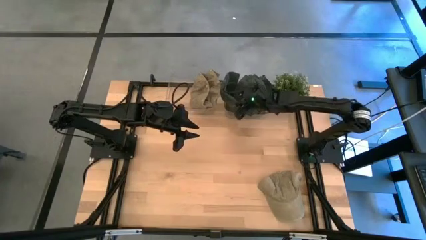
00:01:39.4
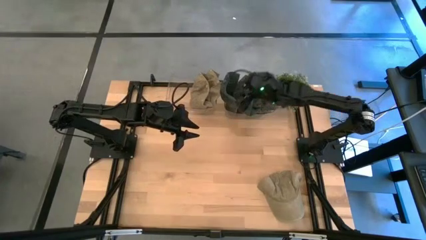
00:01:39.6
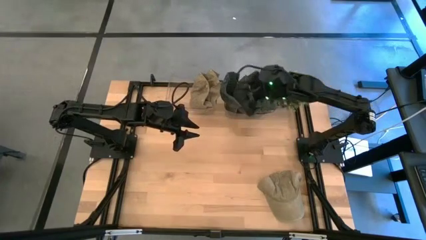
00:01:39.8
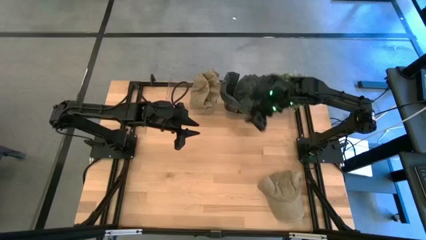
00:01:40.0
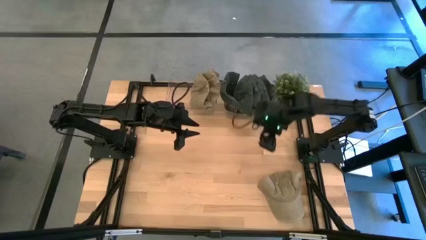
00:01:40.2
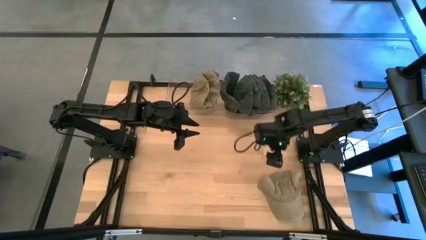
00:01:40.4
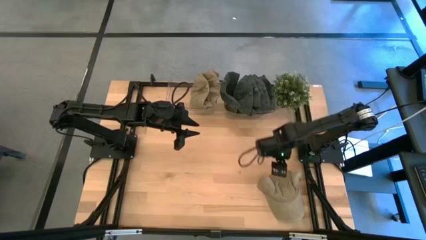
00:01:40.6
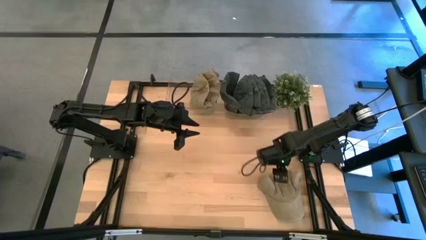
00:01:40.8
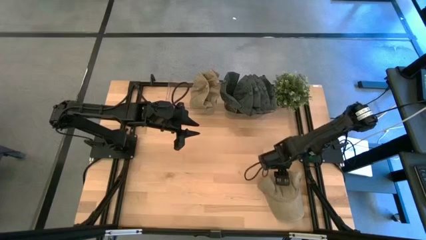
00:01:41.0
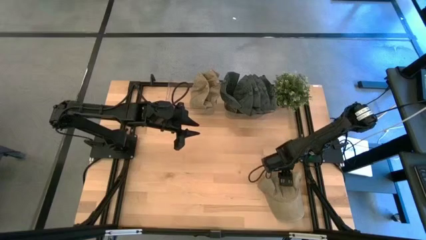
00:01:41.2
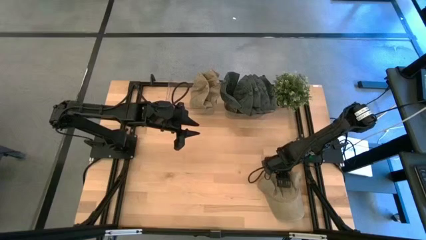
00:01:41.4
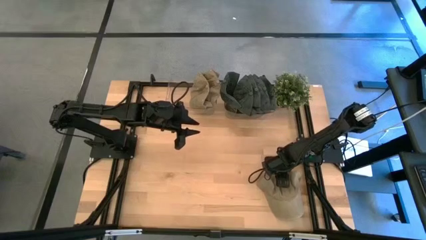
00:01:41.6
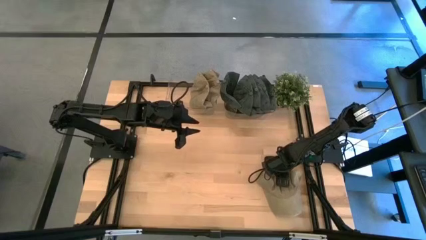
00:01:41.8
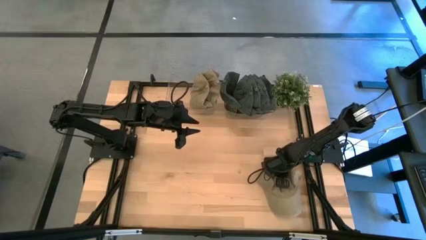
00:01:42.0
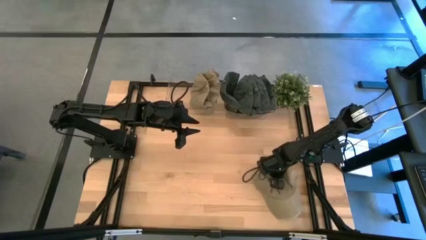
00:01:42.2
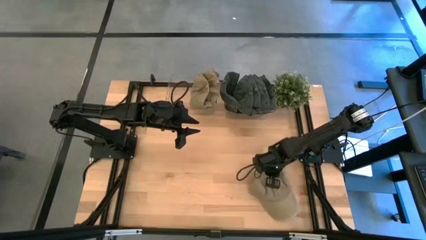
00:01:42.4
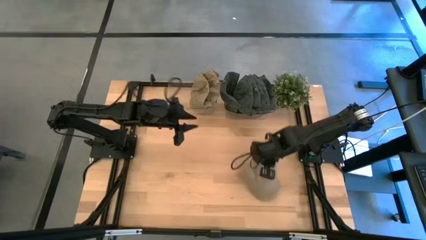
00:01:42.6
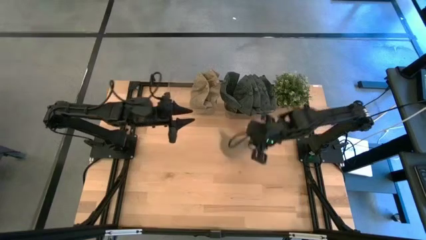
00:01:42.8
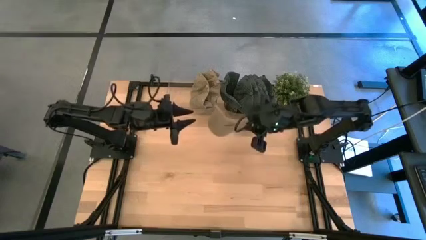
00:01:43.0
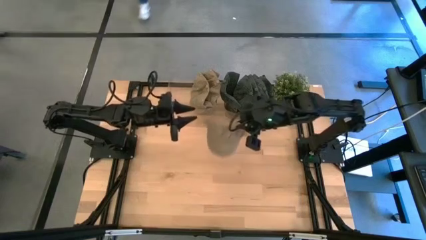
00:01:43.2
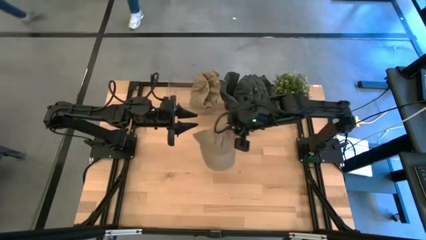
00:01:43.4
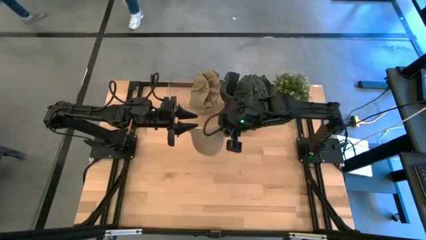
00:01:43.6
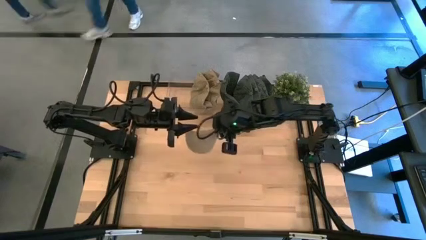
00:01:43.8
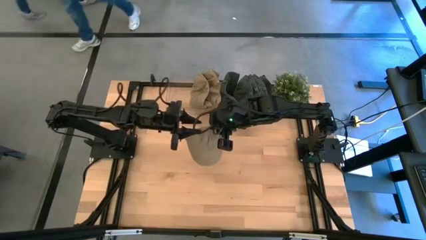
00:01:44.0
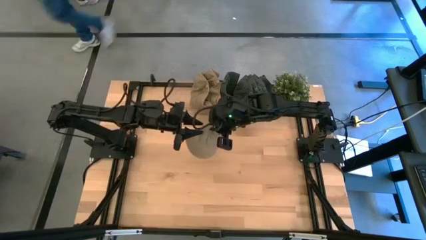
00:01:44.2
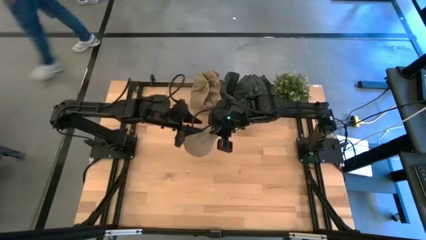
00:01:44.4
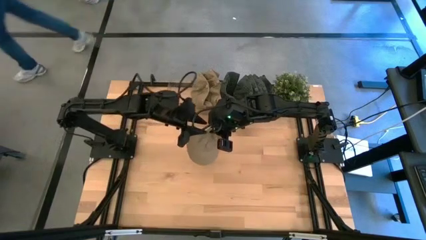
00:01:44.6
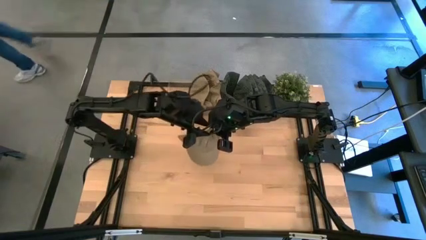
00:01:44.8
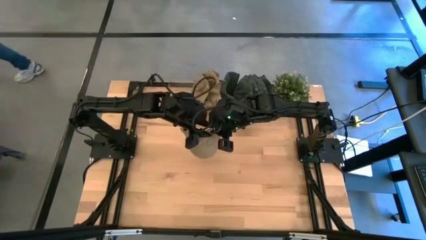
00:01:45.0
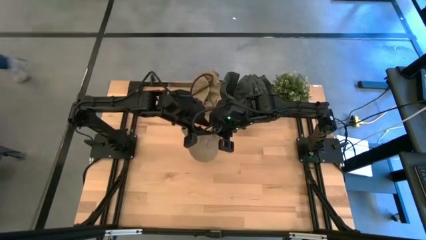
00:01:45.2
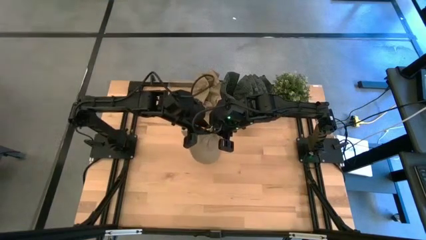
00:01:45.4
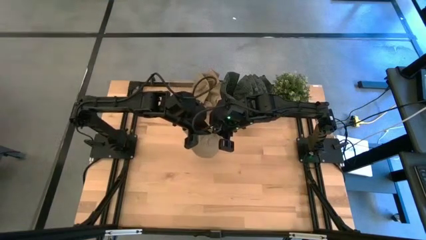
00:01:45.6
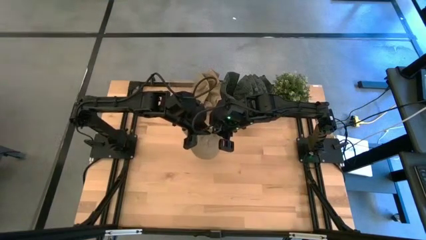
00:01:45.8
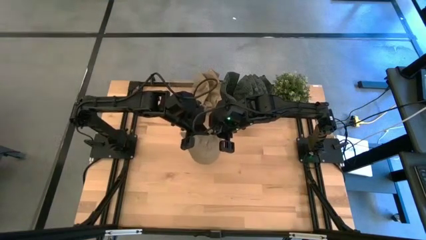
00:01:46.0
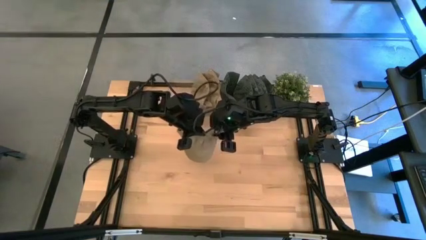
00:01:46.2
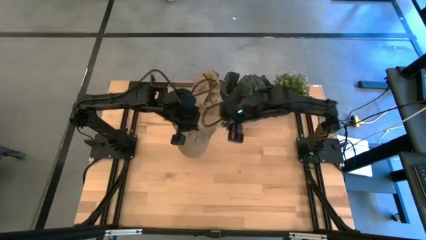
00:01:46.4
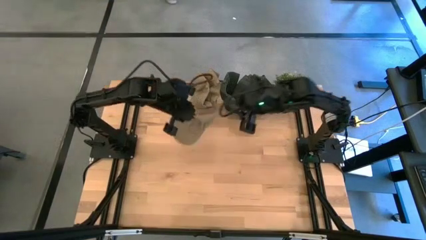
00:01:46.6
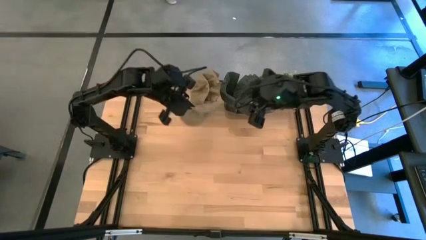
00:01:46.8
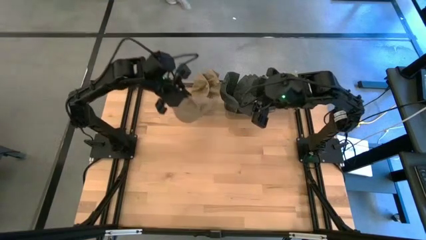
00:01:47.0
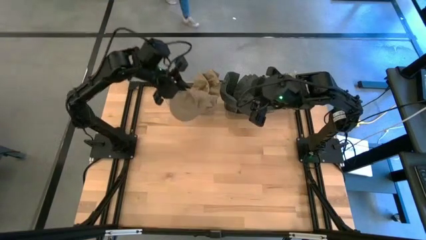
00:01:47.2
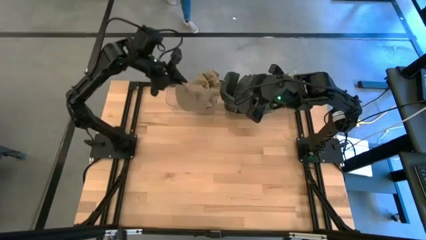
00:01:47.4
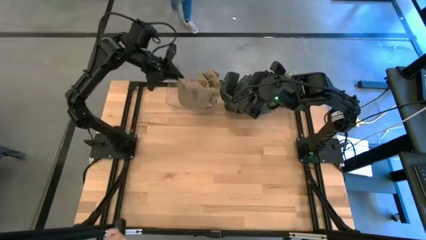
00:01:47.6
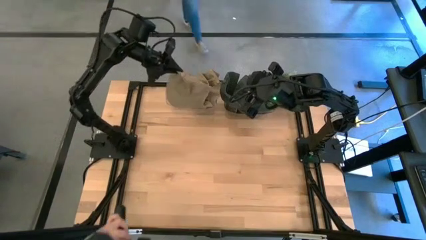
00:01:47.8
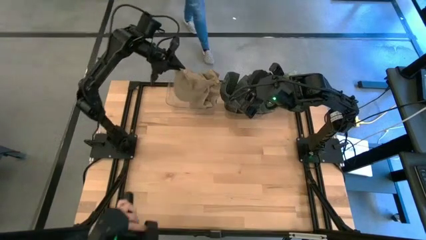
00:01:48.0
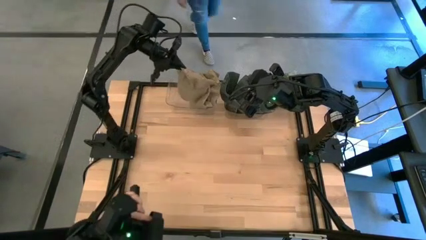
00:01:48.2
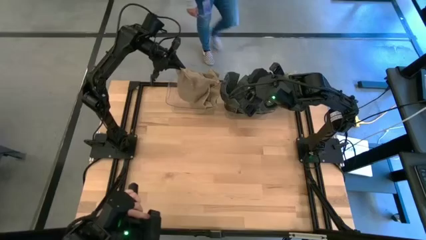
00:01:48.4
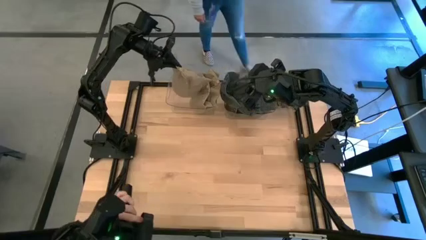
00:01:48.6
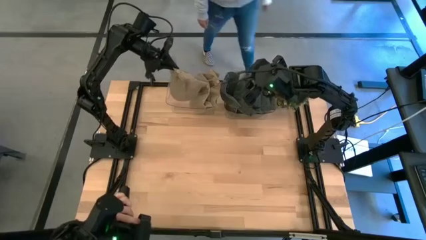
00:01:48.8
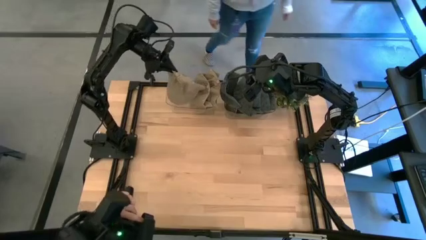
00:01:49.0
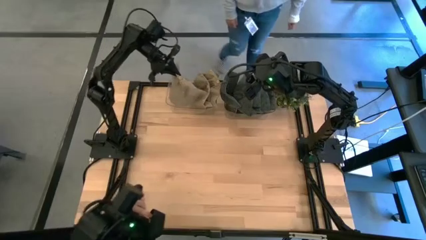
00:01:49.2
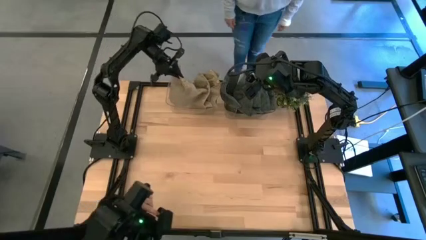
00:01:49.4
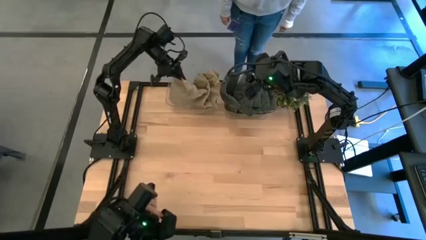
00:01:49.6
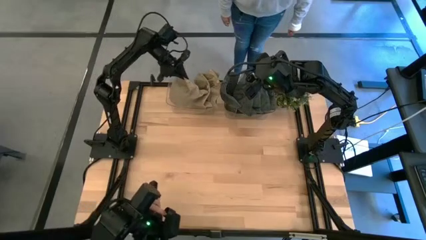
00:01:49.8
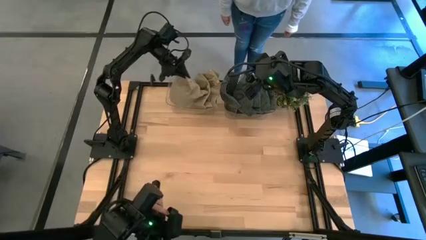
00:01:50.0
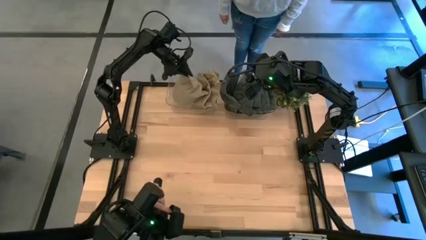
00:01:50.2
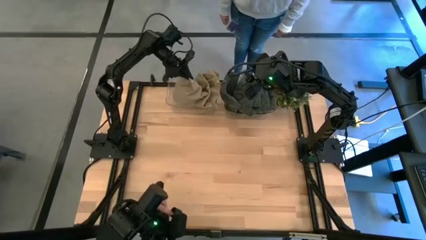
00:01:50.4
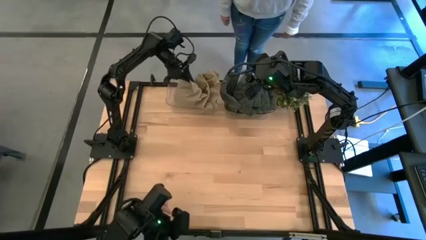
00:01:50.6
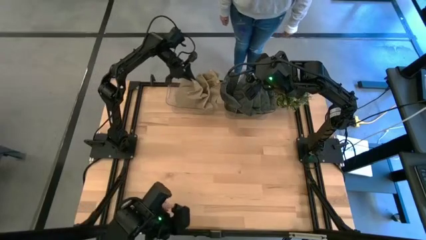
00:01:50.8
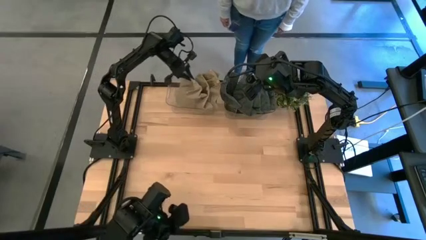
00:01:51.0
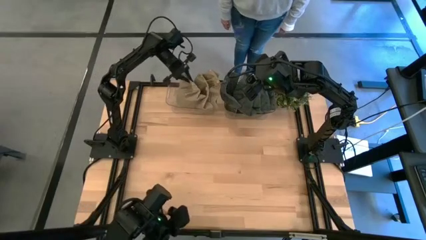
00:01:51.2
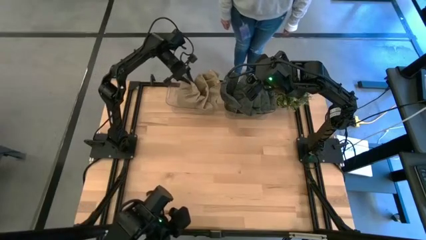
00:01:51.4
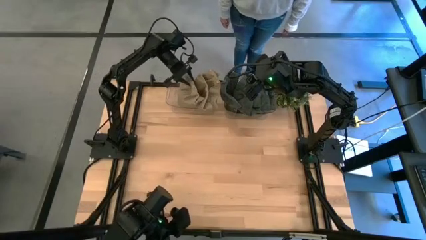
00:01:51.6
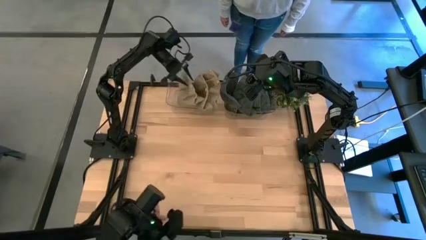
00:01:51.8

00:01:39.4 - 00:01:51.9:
Task: Pick & Place hat
Put the brown cap into the left transparent bin

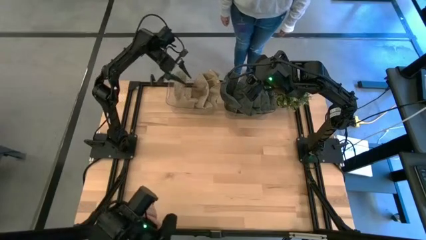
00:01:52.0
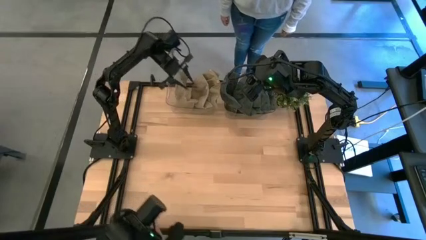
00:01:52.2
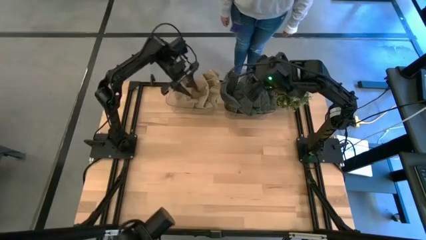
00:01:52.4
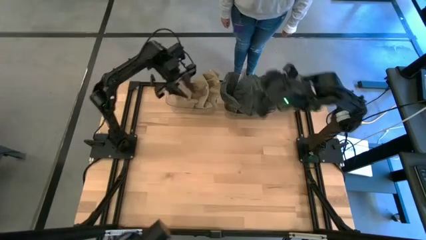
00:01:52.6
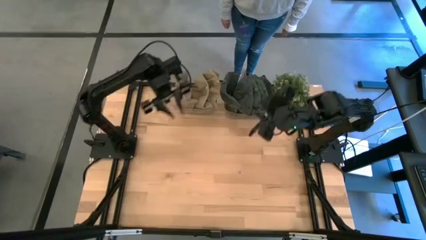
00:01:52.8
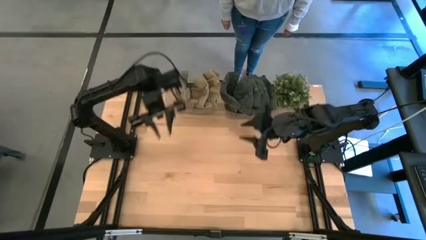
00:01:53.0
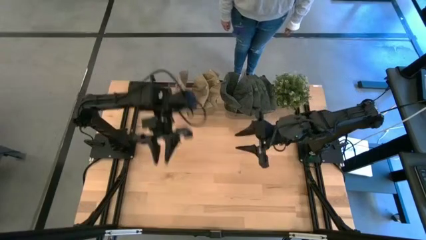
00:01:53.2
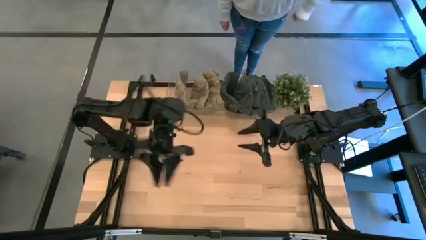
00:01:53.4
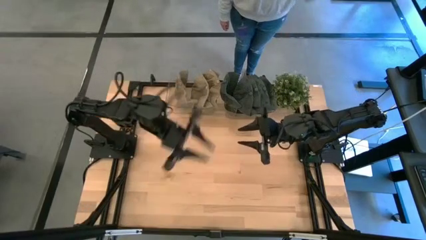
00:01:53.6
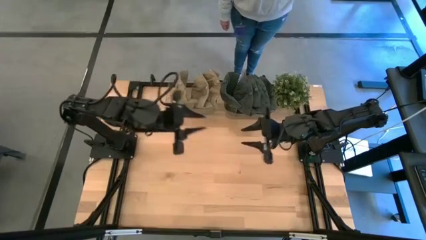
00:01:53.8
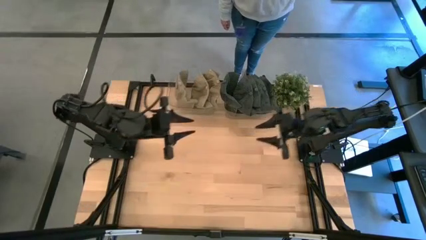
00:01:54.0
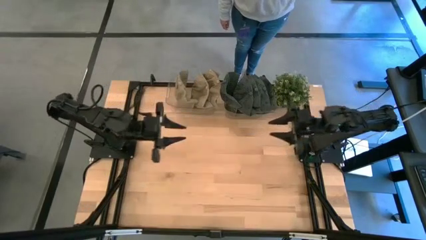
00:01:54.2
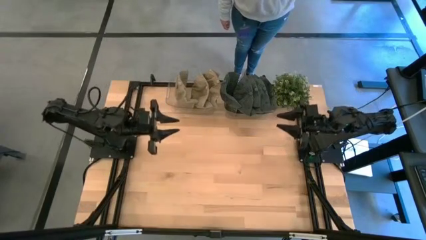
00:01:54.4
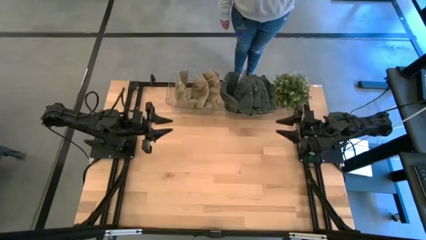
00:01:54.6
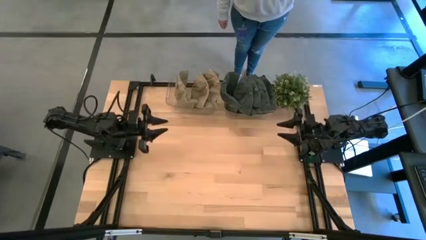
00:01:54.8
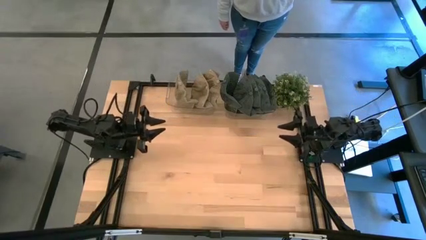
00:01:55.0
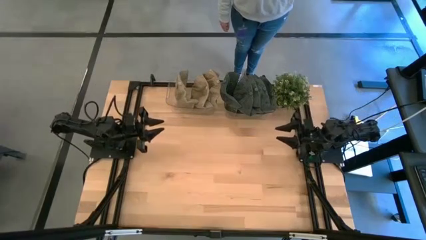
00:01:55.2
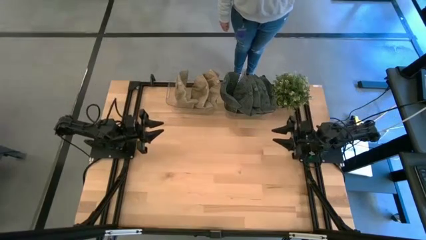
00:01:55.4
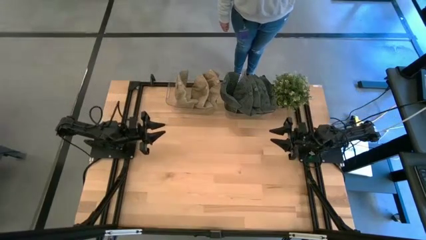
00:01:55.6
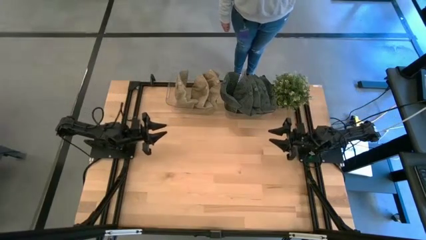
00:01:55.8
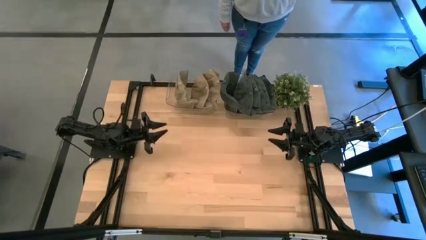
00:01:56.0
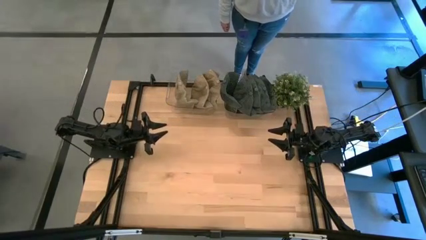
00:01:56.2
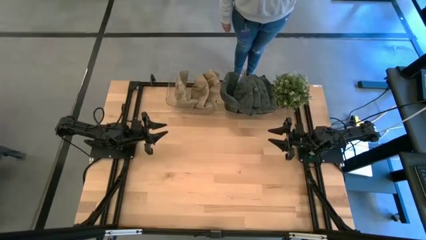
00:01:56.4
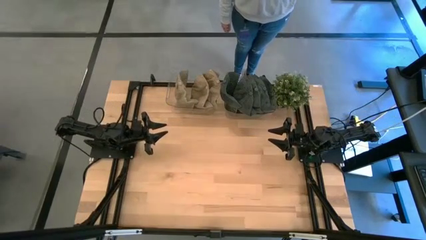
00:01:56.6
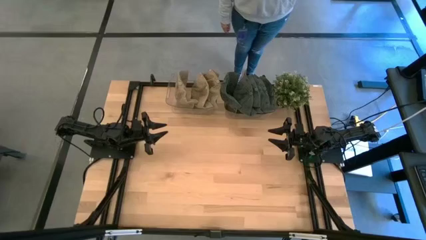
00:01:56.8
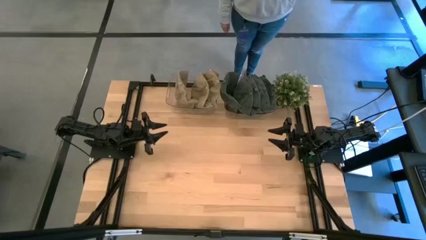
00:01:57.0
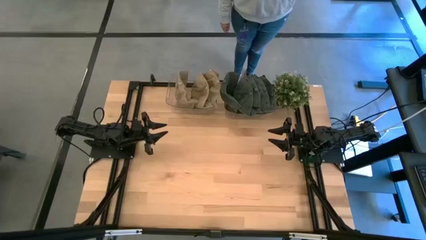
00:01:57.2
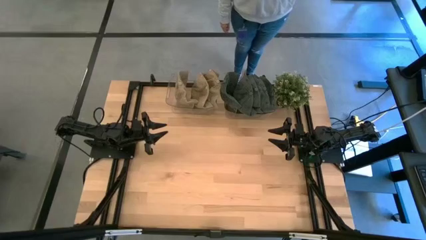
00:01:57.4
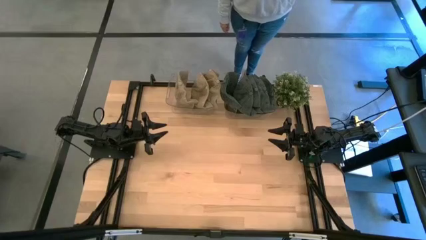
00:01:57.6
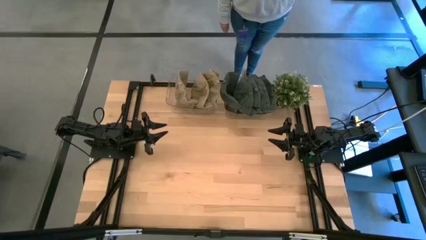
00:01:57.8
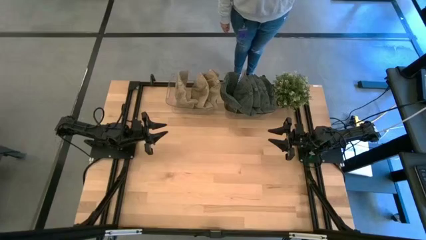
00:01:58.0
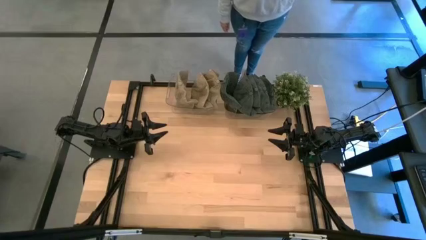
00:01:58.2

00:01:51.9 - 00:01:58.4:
Return to Home Position
